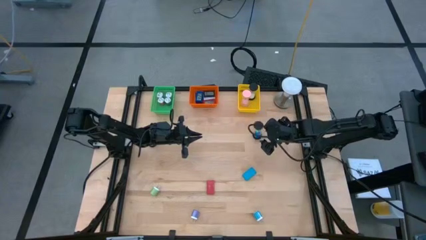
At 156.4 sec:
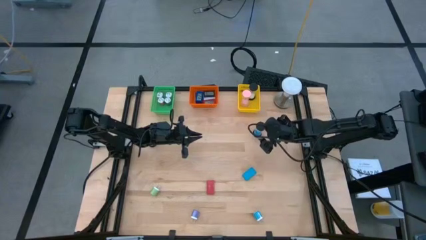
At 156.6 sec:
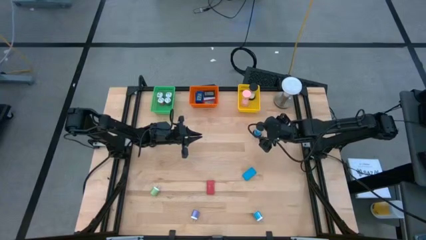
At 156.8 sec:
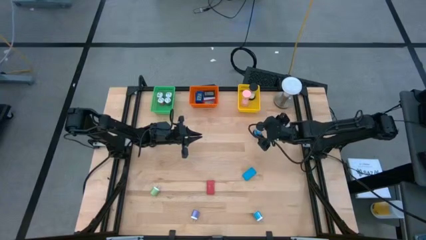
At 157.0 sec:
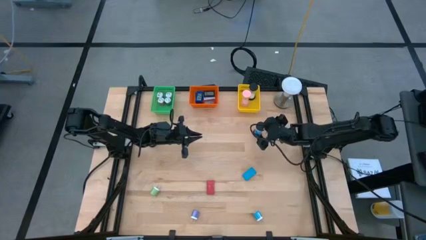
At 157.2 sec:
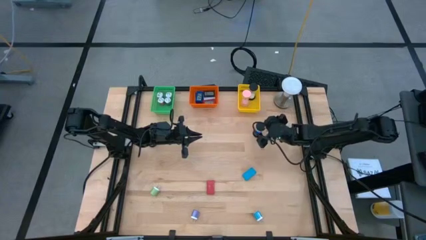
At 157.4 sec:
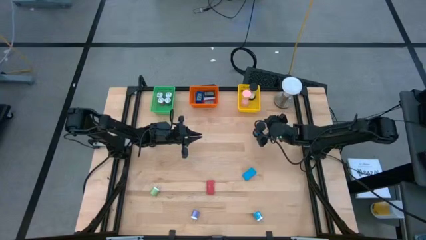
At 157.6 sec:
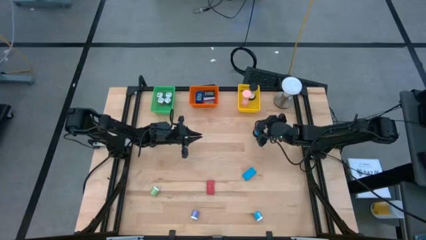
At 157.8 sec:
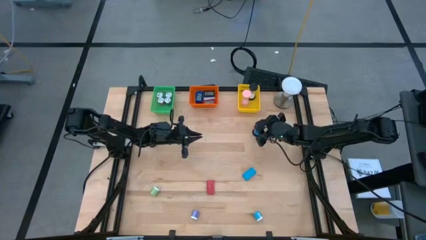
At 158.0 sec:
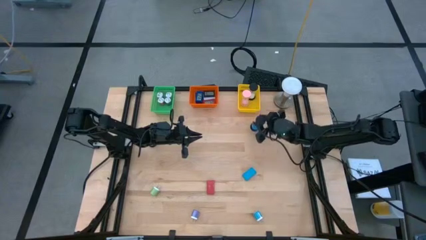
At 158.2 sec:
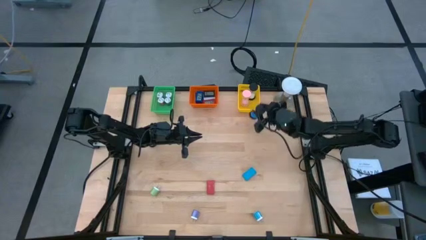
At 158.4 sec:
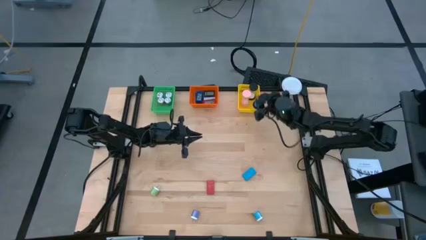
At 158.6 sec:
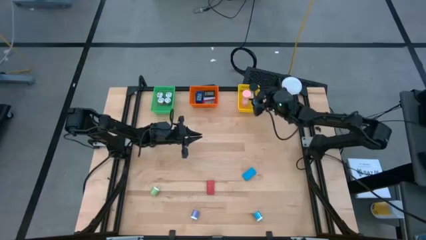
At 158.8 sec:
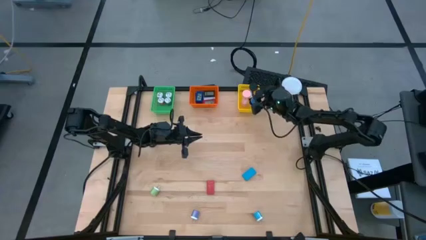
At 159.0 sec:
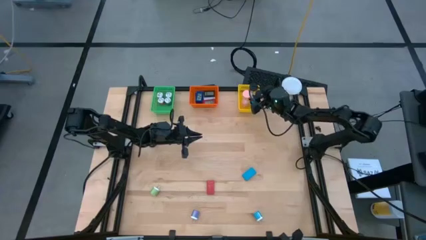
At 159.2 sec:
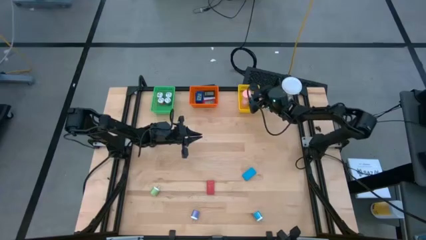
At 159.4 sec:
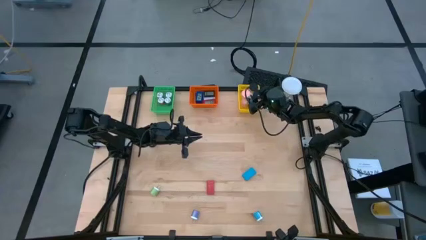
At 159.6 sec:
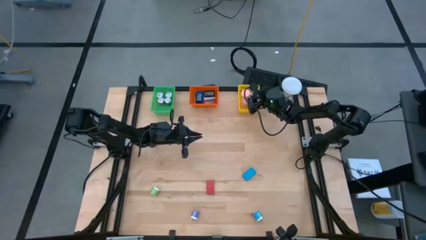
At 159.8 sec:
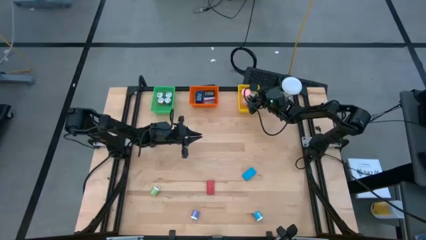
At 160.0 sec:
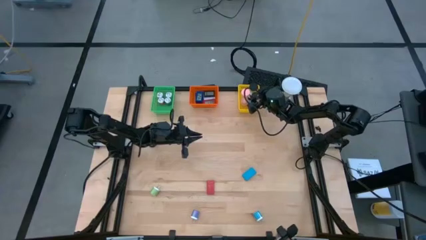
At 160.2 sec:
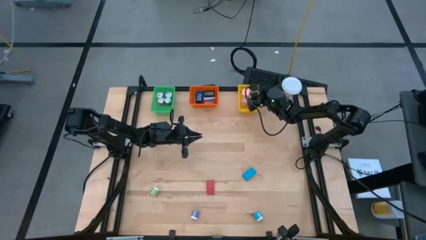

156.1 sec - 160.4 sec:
Task: Pick & Place Office items
Put the blue hourglass into the yellow bin

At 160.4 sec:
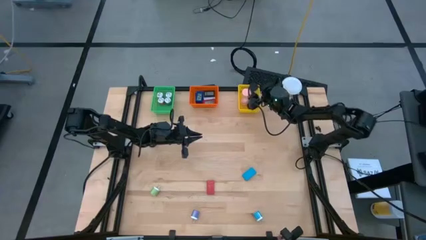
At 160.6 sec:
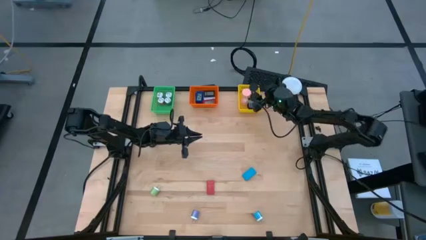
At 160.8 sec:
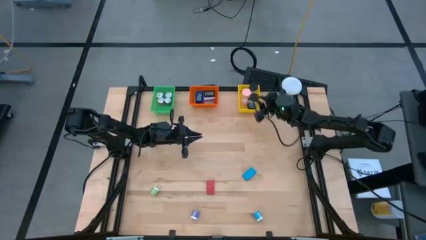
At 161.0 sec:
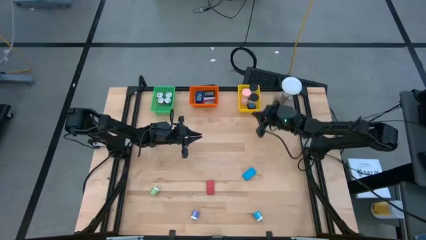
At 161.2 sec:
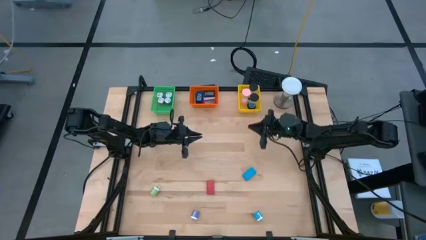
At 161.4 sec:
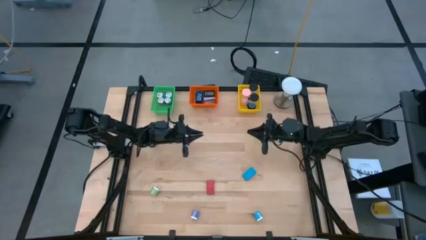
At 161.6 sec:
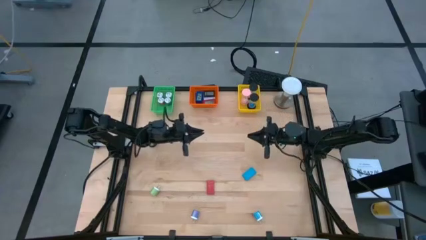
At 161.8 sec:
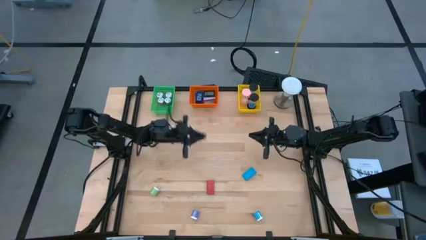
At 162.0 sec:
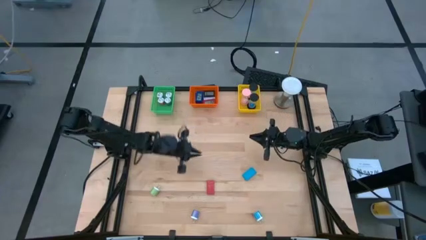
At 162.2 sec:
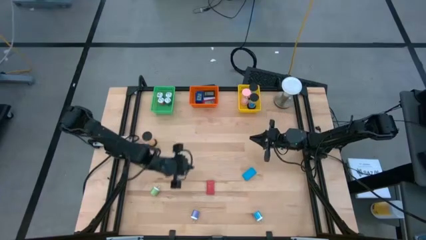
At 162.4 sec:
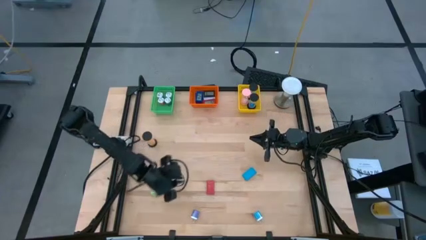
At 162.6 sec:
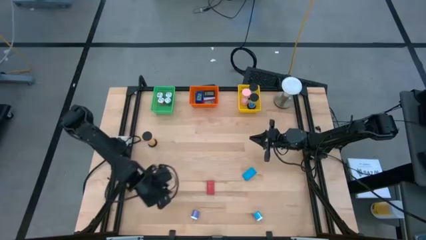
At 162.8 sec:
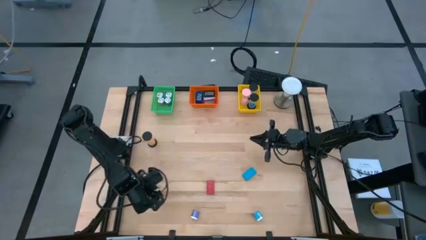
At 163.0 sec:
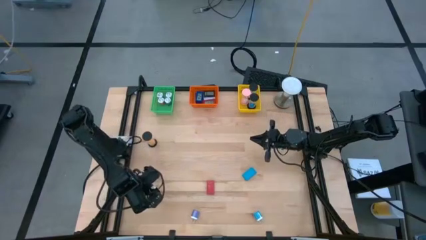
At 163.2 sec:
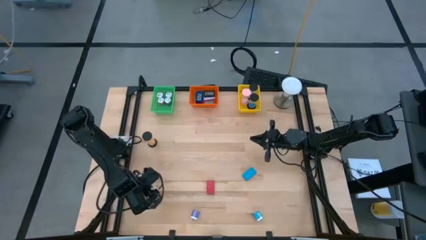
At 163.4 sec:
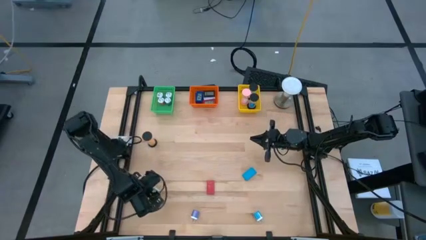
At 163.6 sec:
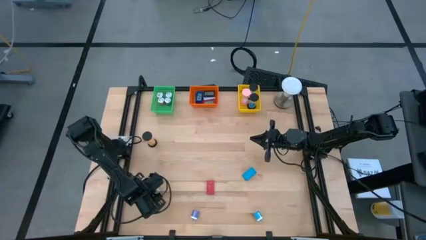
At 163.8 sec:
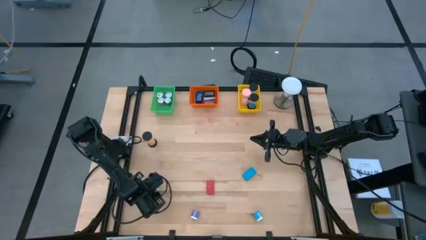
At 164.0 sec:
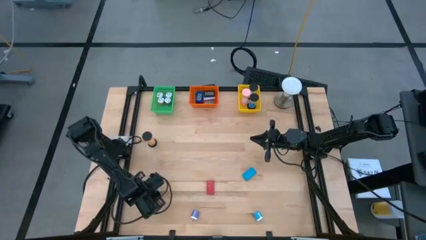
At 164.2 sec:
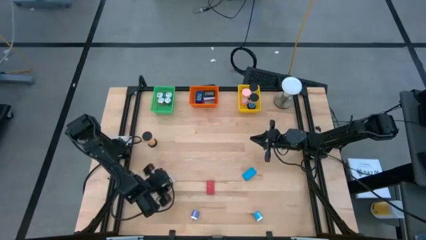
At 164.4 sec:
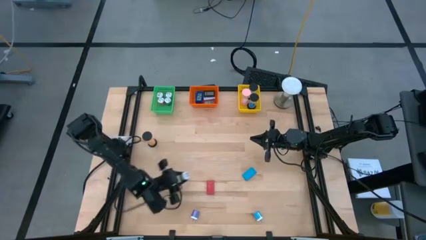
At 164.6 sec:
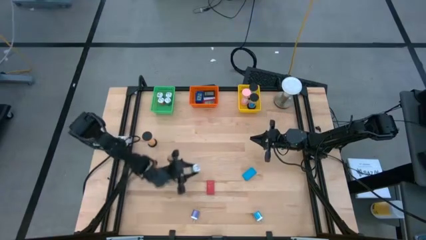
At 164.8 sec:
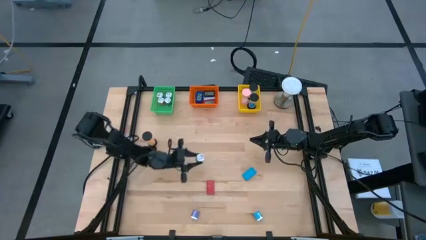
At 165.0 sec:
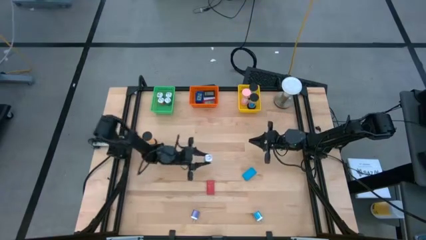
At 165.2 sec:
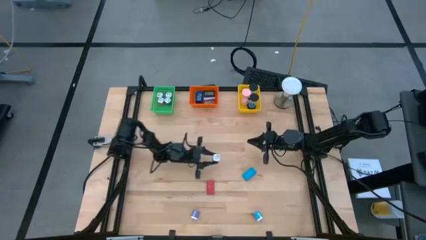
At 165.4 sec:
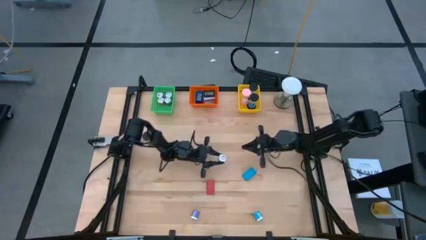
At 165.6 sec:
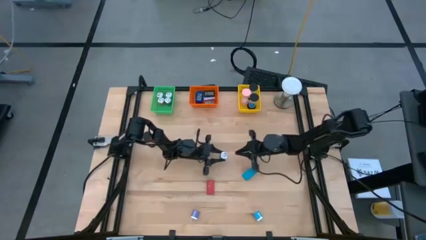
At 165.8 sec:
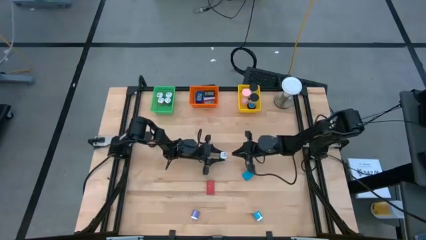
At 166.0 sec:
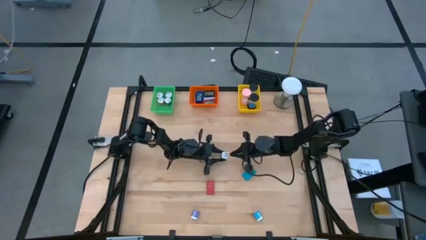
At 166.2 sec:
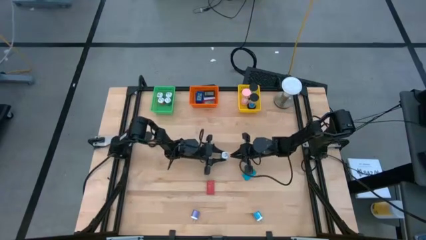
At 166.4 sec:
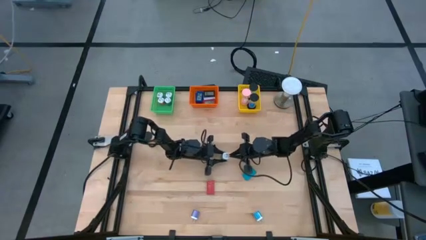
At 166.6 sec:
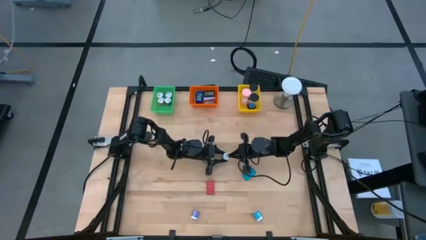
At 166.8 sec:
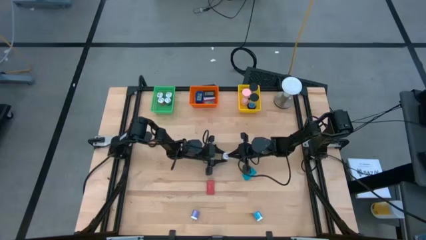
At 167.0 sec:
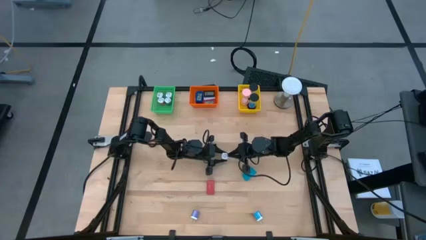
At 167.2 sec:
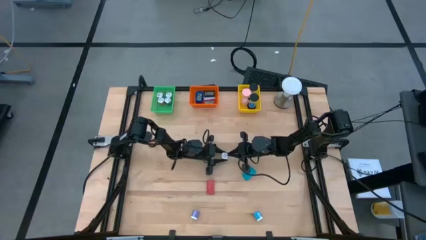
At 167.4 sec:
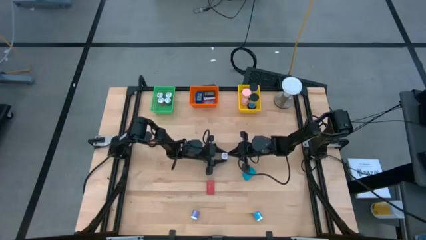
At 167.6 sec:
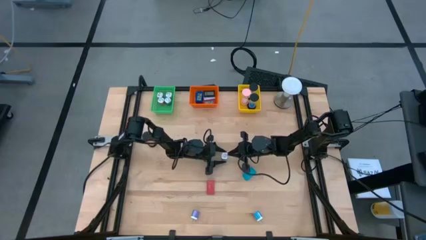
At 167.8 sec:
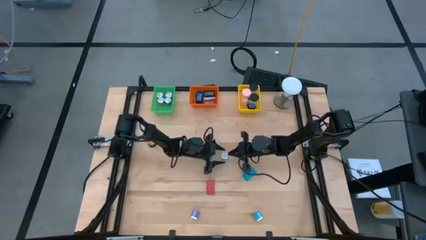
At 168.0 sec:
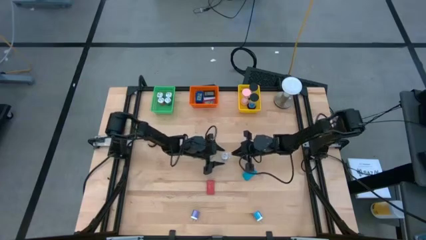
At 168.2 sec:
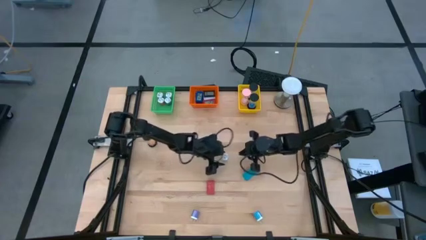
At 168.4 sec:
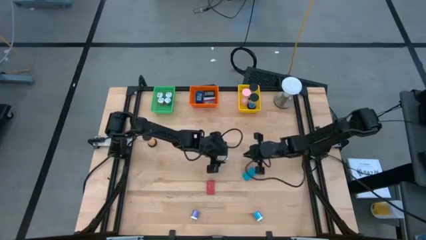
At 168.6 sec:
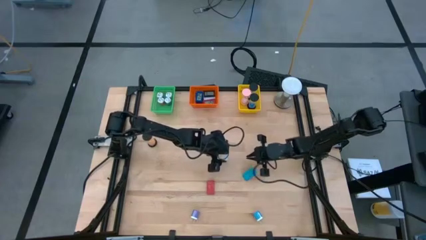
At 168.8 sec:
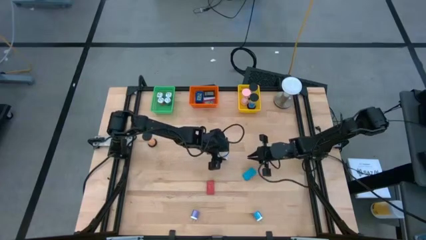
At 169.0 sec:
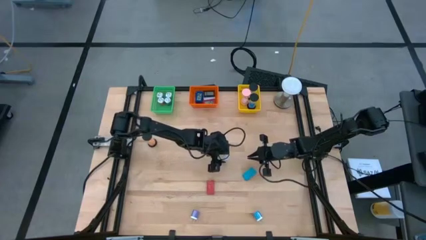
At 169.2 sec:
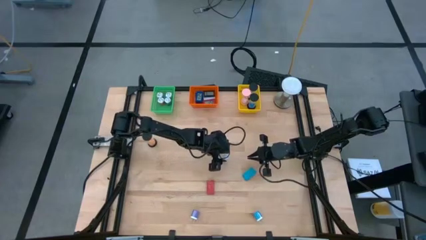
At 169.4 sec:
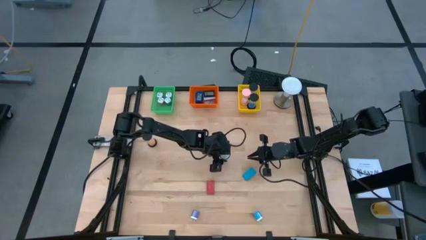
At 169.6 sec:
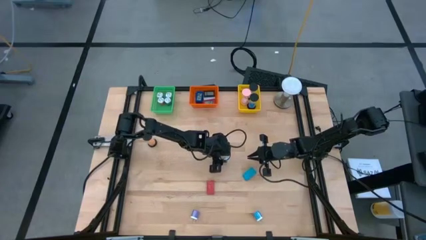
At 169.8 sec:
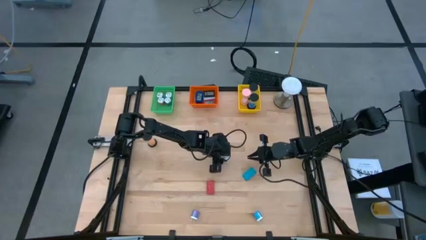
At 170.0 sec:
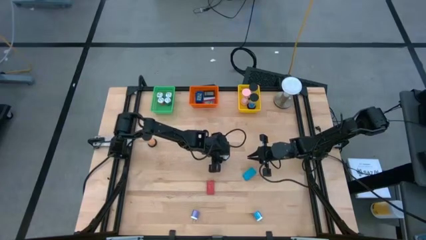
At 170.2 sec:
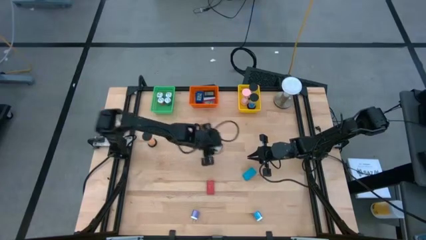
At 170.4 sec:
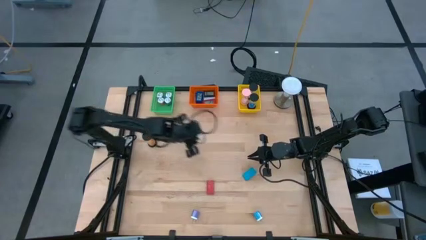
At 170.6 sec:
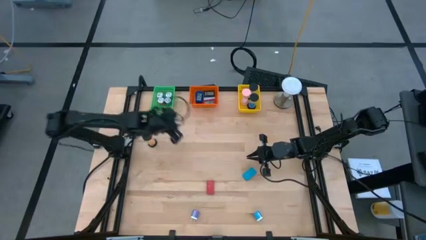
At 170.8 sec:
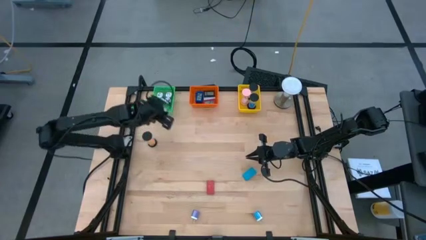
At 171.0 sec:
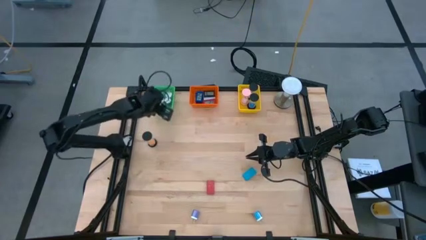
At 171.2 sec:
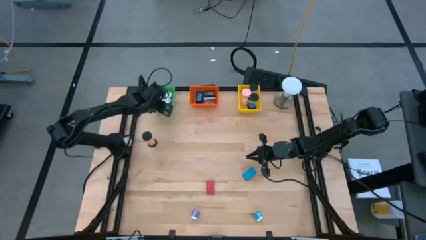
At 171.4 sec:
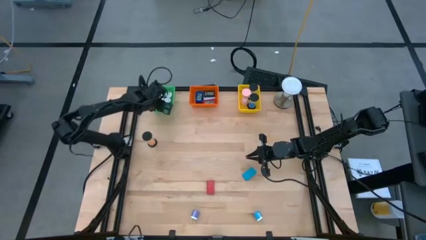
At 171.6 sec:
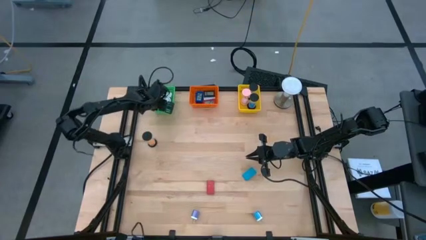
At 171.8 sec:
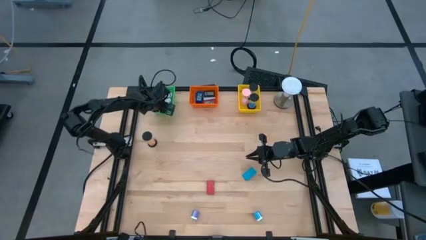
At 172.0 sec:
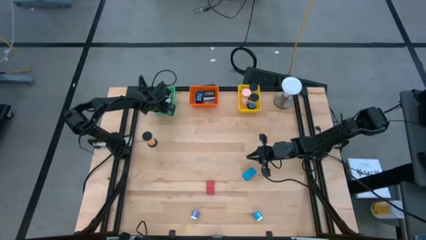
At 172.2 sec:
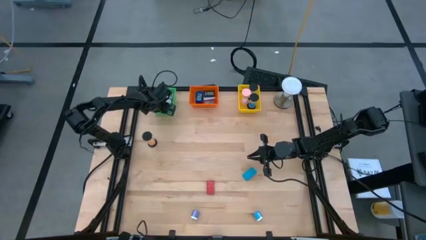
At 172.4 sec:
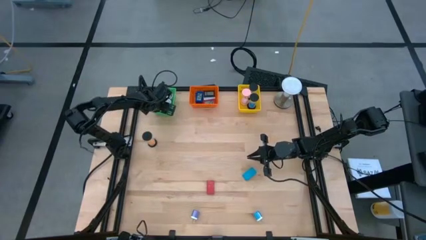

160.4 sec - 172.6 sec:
Put the green charger adaptor into the green bin
